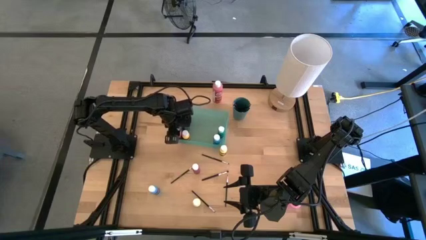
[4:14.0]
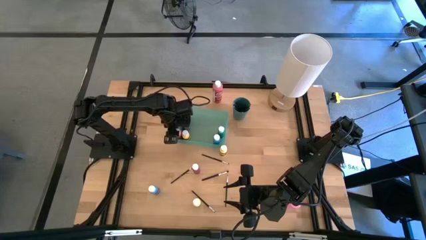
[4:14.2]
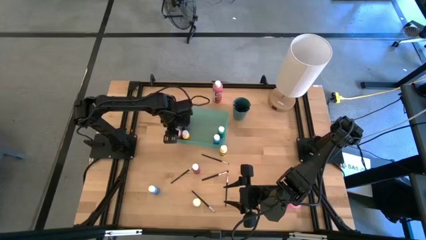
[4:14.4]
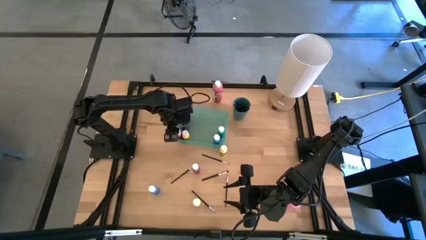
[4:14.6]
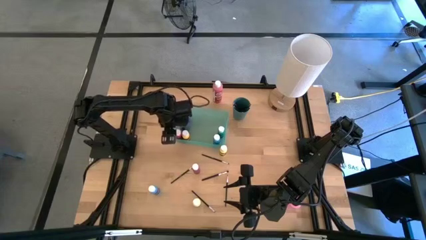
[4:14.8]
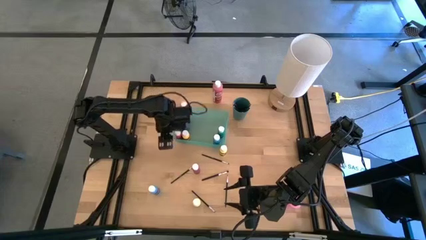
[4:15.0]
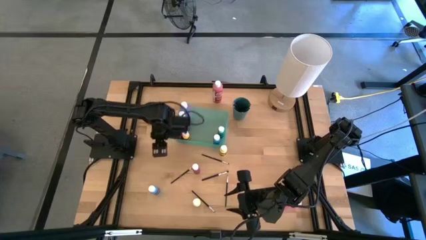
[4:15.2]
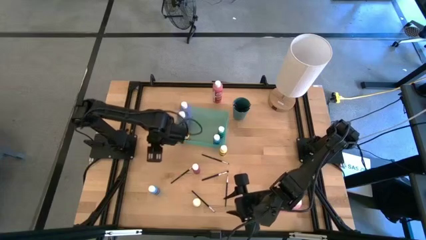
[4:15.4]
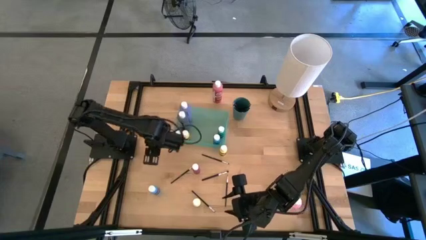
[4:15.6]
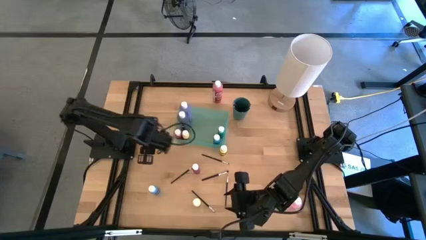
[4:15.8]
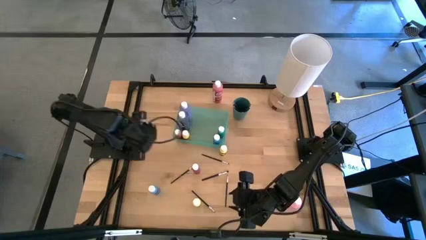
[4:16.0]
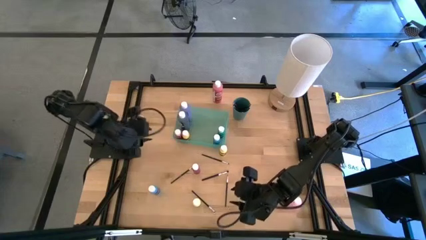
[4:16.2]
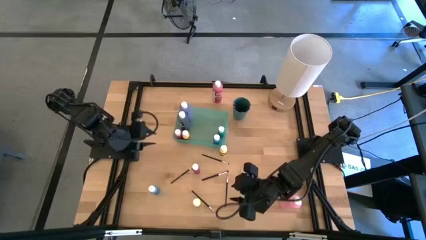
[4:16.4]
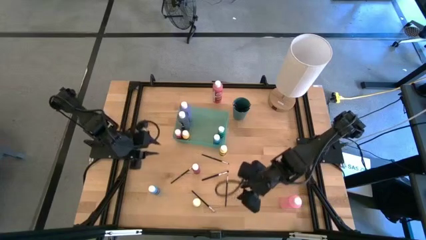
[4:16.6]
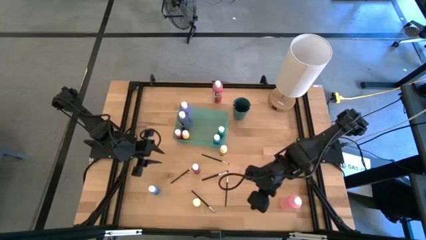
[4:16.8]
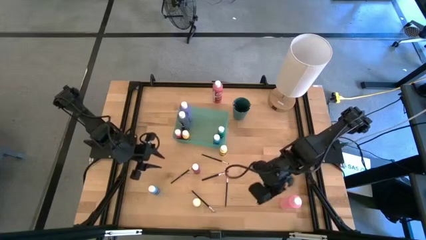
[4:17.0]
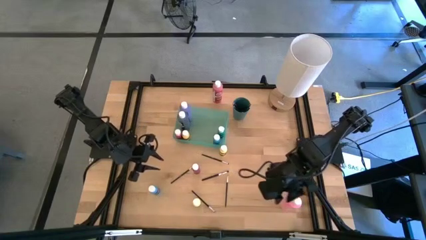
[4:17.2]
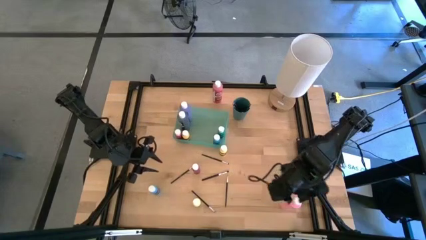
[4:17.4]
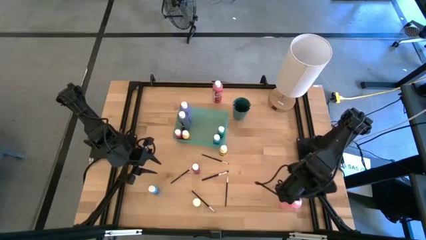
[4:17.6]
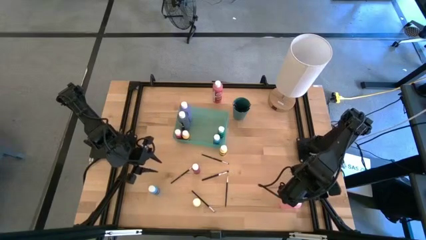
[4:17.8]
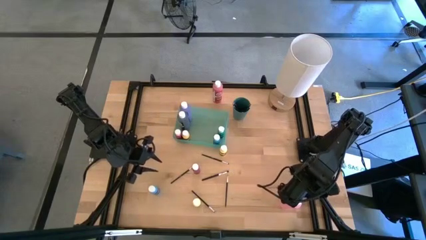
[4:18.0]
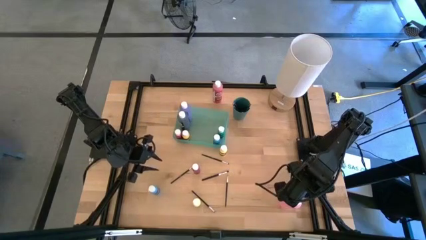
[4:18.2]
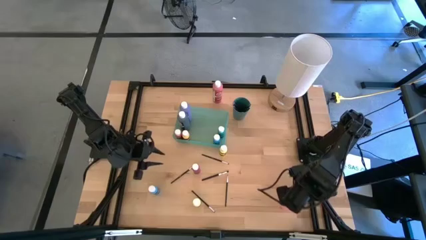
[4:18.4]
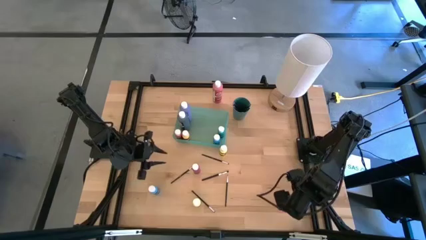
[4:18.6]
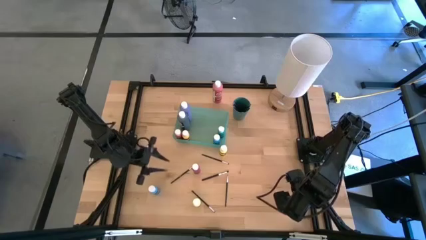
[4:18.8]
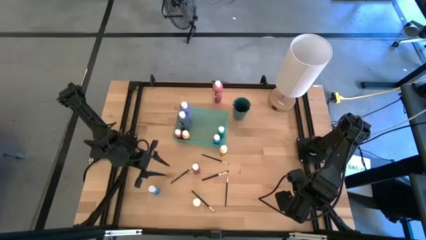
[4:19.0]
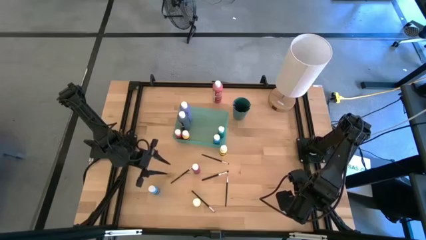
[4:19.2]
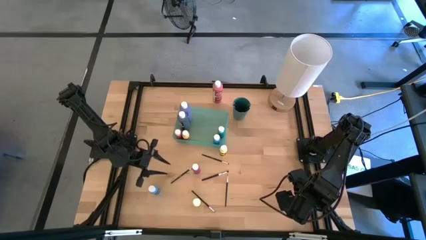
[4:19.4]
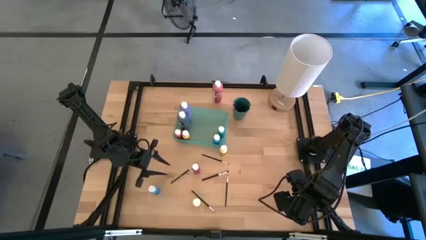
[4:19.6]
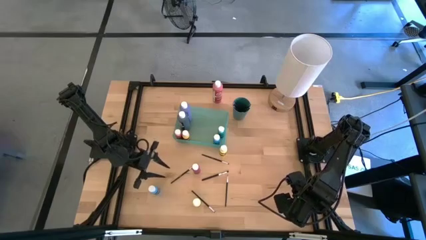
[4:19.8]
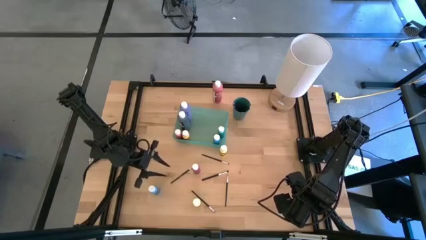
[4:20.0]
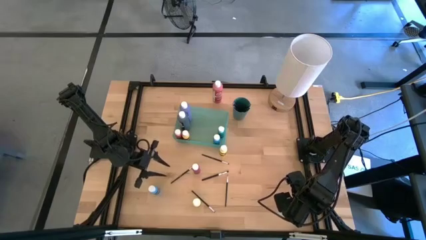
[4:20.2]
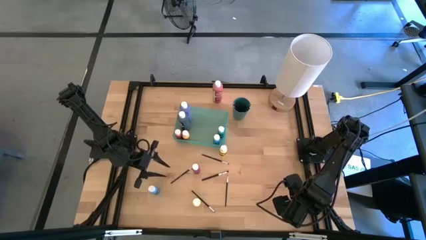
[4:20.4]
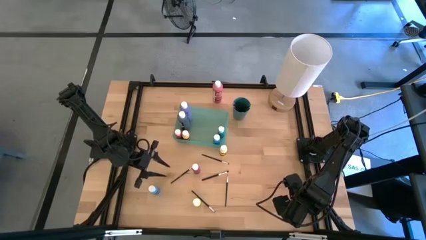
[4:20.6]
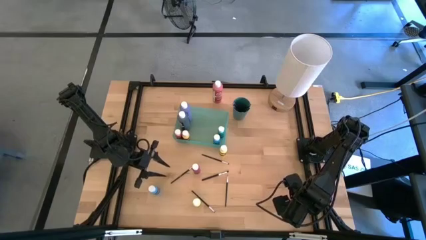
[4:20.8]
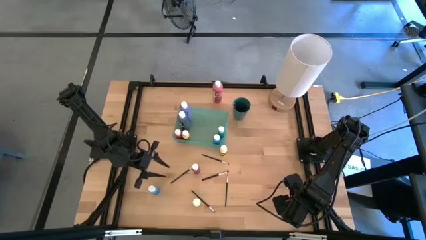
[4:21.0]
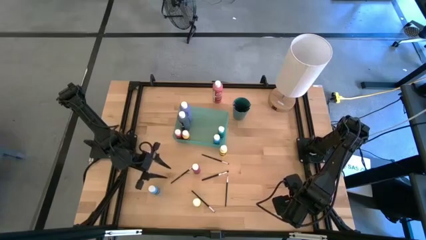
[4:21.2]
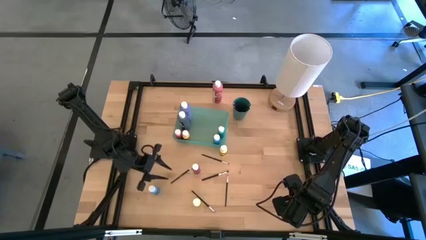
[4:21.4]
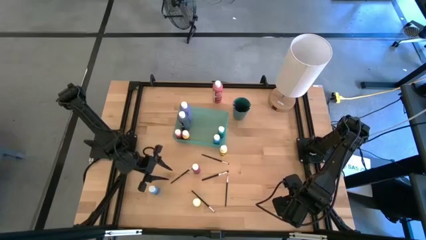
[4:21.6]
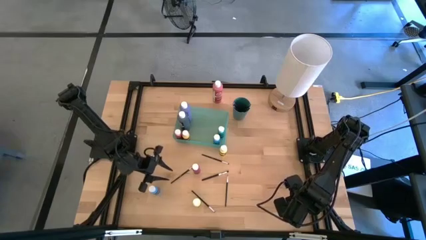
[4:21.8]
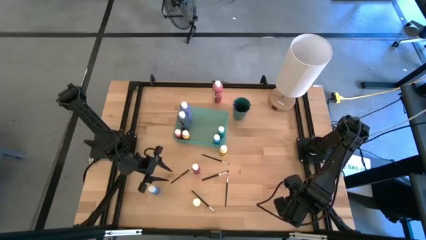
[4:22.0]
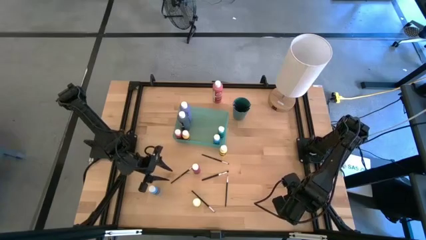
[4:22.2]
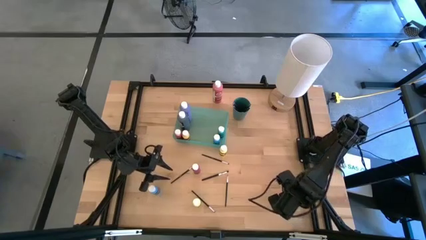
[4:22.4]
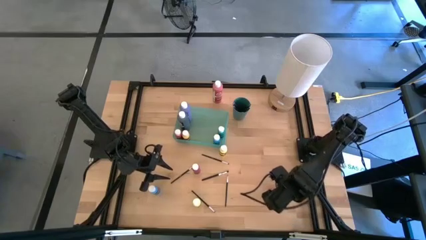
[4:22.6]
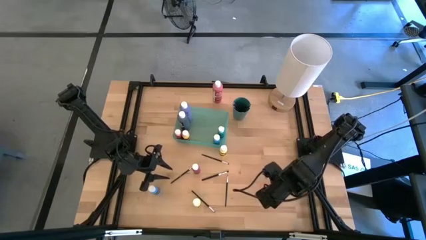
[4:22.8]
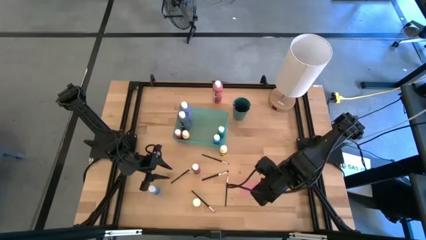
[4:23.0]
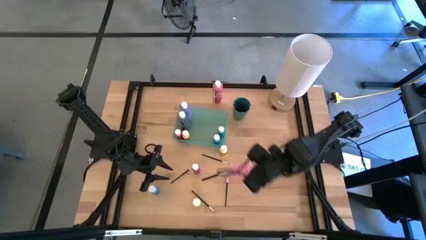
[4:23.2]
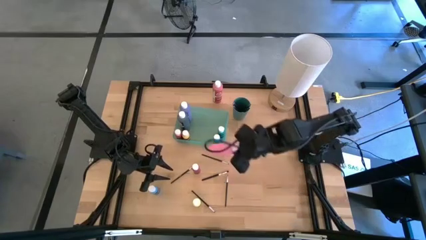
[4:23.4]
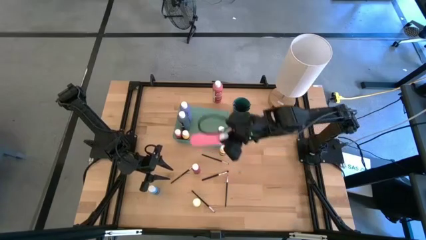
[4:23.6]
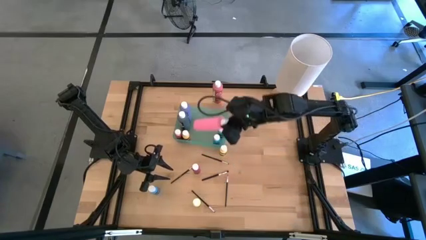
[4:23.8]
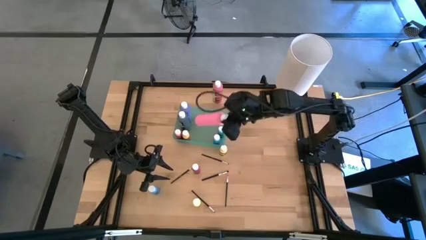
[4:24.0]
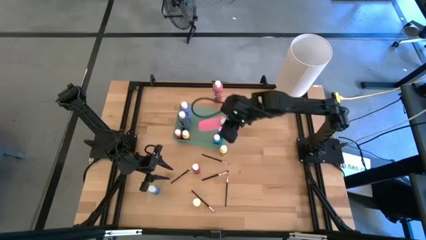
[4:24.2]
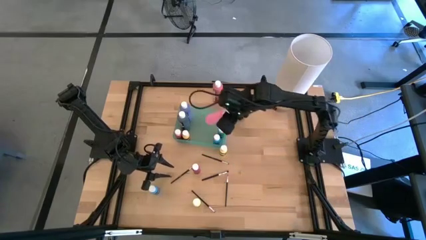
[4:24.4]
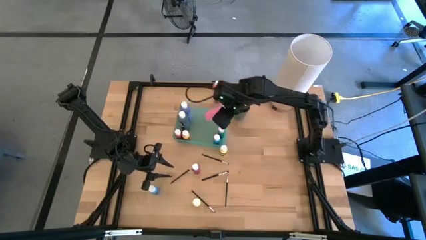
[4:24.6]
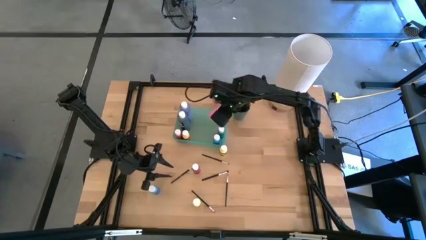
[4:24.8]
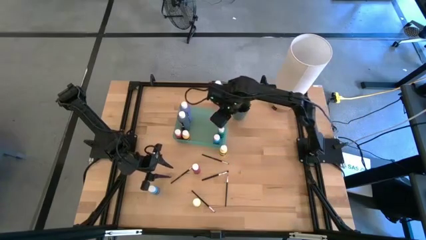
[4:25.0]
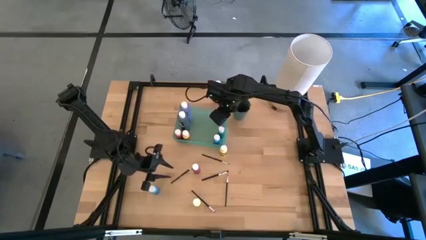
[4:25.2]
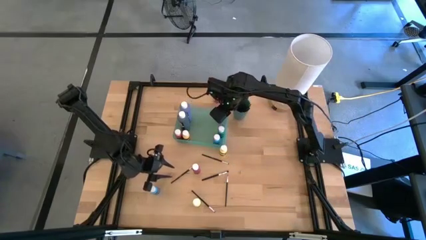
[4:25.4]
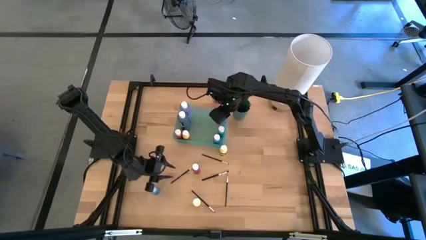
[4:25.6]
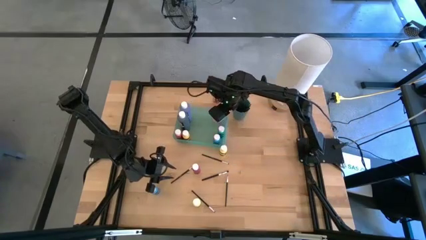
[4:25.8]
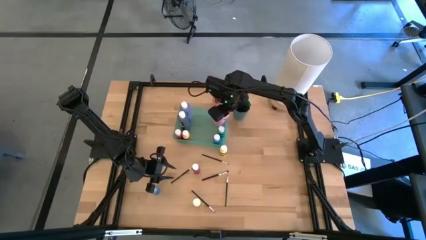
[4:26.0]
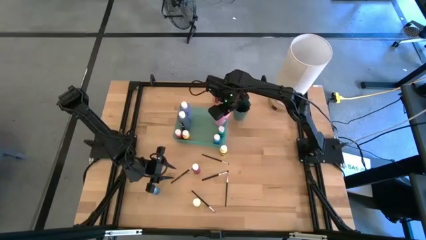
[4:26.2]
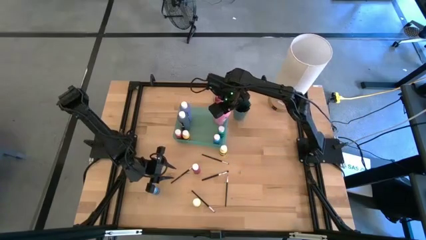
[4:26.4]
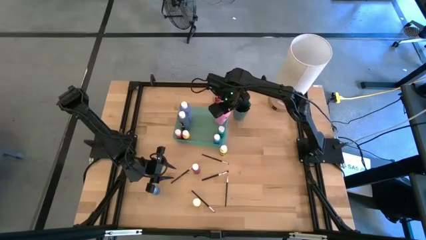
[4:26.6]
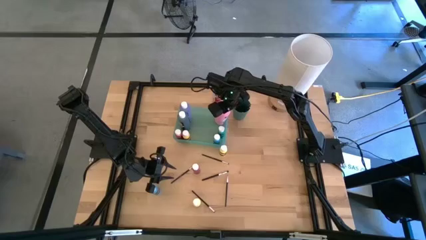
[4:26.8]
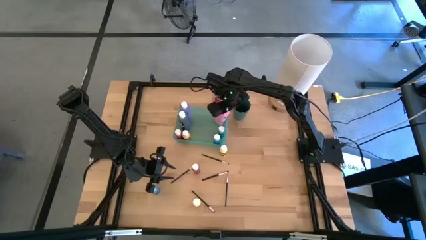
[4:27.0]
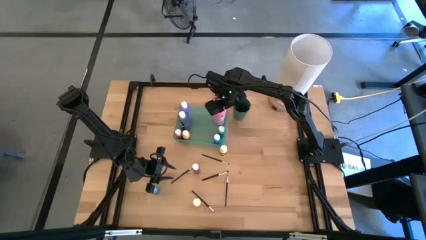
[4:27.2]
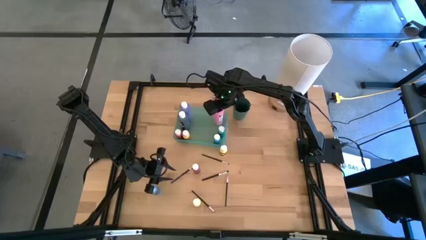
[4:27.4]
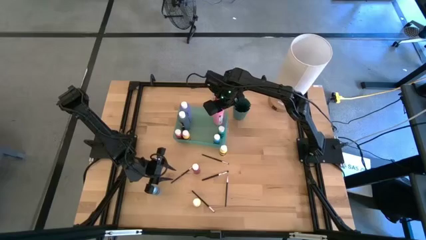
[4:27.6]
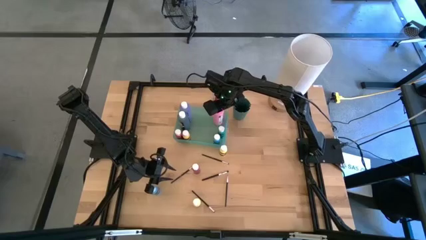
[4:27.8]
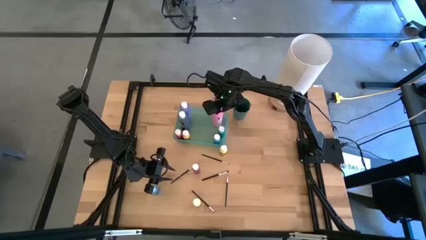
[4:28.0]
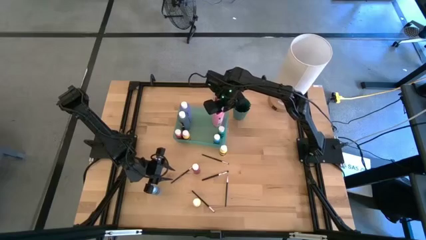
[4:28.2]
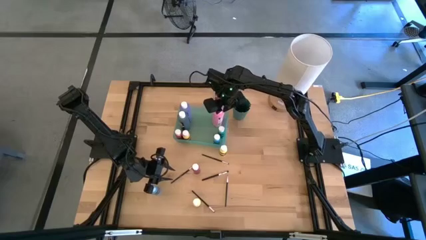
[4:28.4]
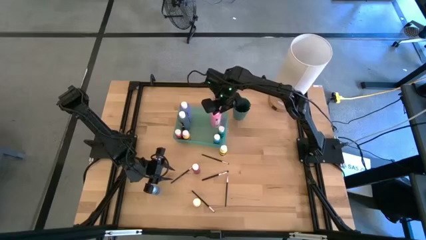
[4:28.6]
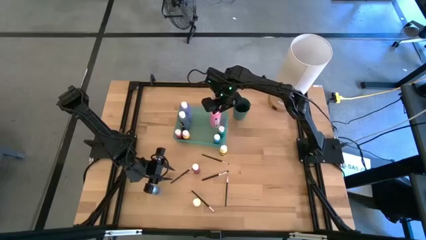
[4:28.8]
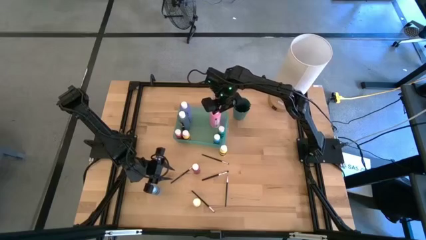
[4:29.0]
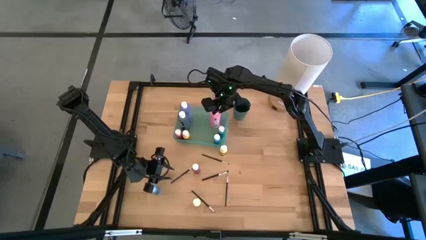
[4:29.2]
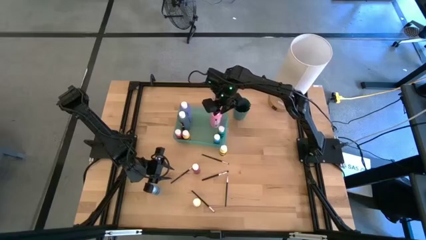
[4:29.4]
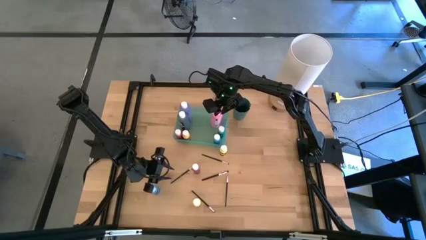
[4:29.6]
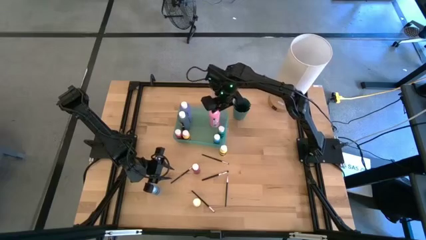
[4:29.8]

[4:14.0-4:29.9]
Task: Pick & Place Paint Supplies
Put the big light pink bottle into the green bin
